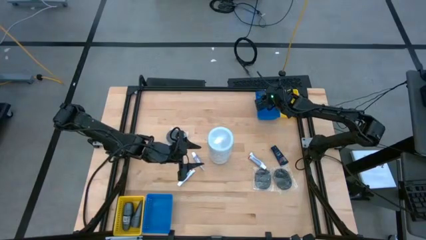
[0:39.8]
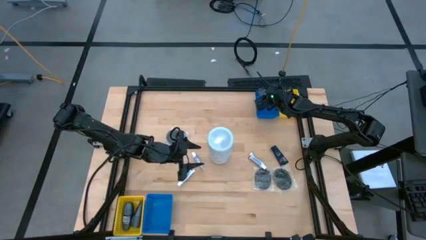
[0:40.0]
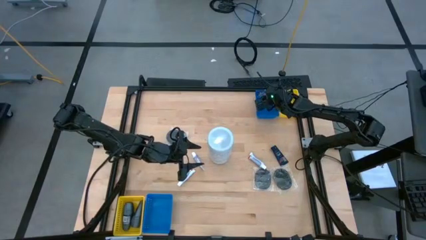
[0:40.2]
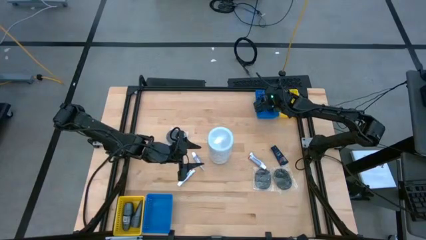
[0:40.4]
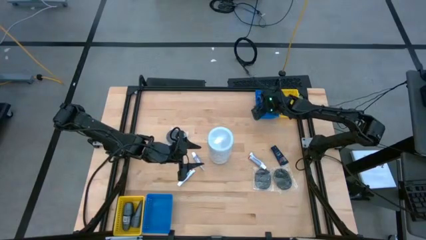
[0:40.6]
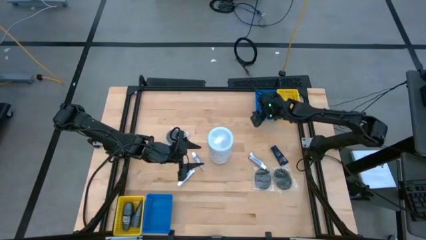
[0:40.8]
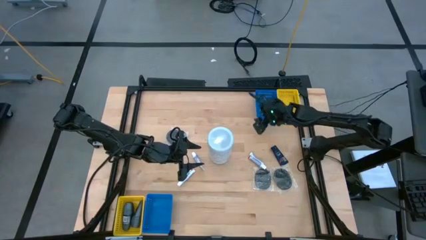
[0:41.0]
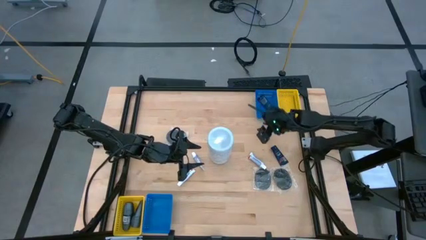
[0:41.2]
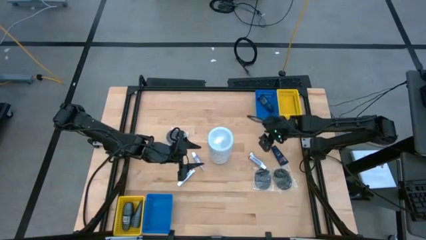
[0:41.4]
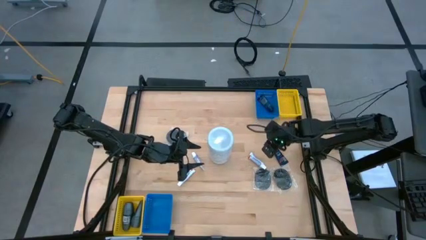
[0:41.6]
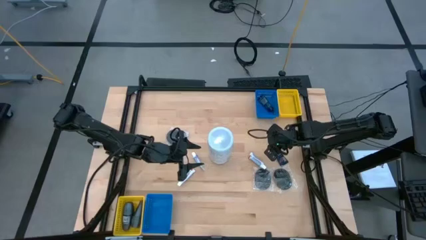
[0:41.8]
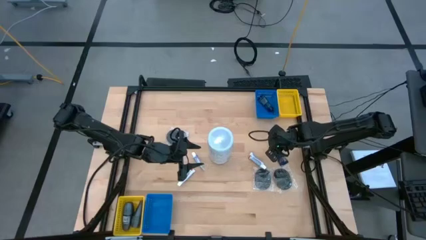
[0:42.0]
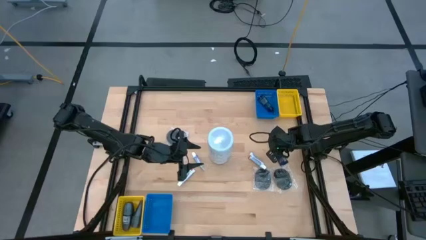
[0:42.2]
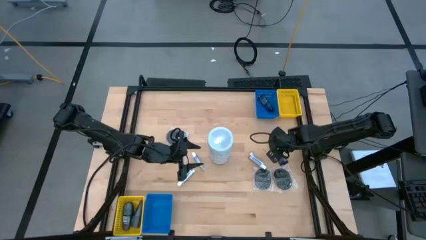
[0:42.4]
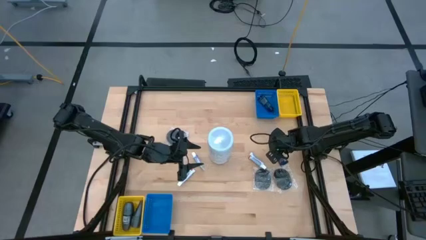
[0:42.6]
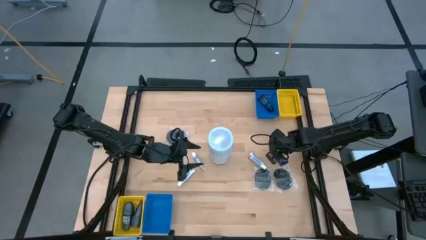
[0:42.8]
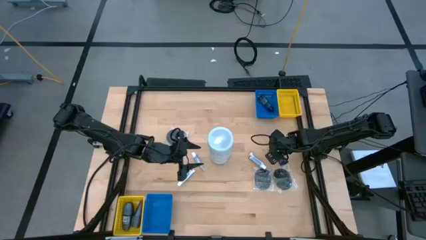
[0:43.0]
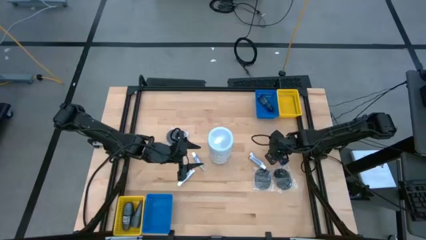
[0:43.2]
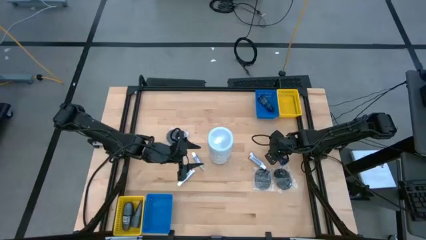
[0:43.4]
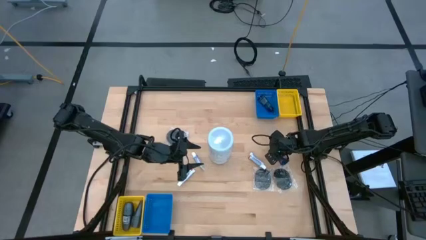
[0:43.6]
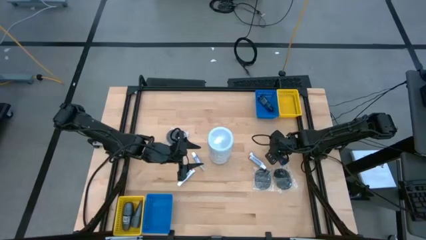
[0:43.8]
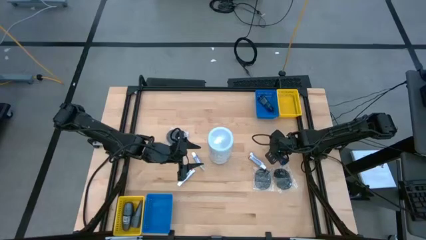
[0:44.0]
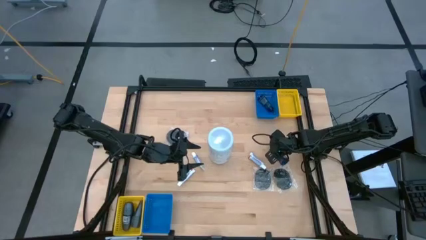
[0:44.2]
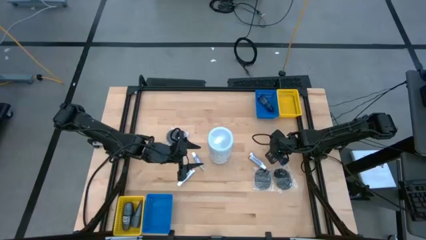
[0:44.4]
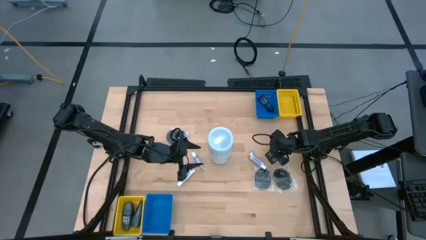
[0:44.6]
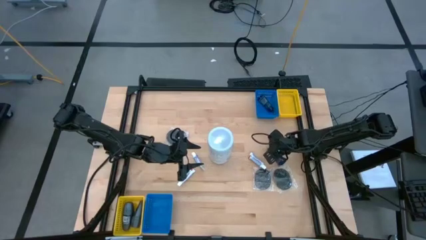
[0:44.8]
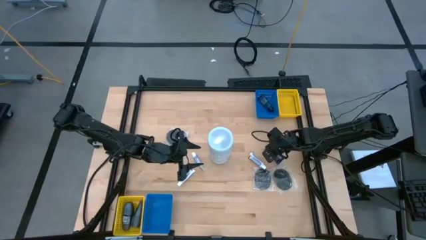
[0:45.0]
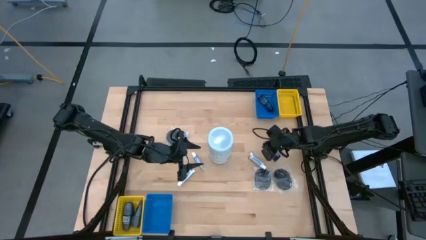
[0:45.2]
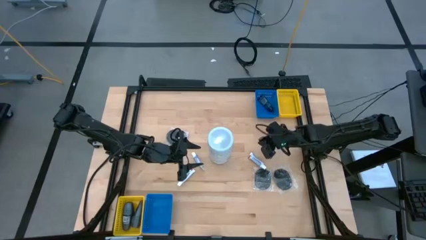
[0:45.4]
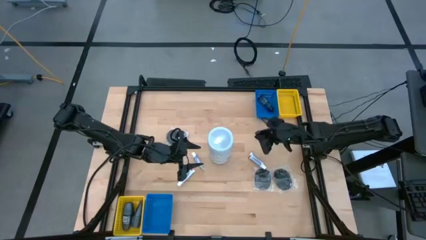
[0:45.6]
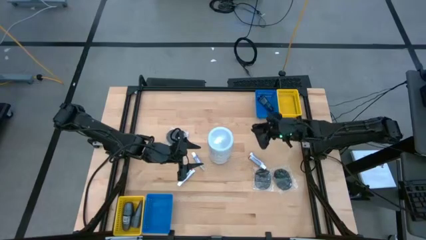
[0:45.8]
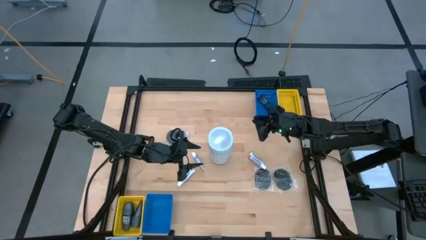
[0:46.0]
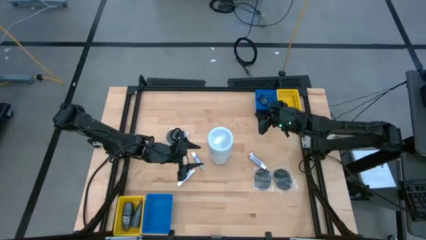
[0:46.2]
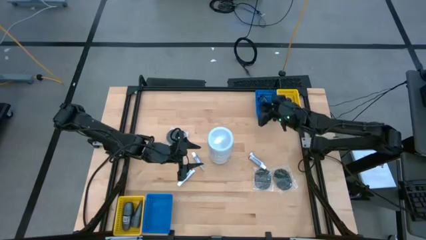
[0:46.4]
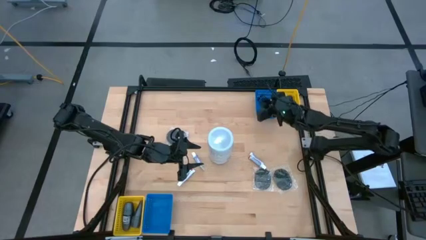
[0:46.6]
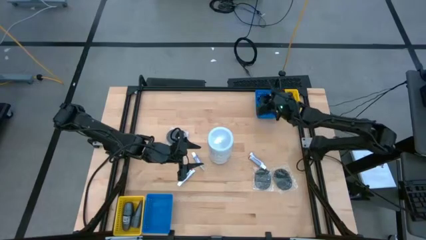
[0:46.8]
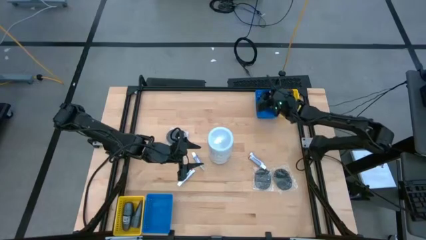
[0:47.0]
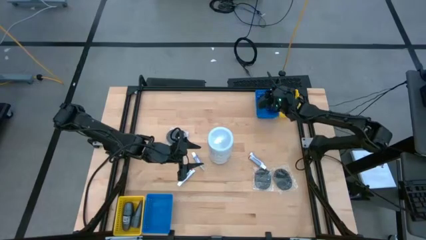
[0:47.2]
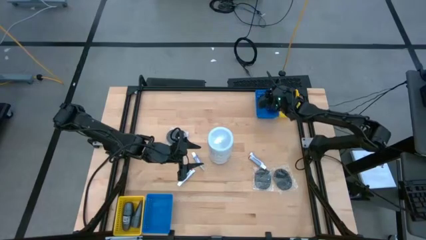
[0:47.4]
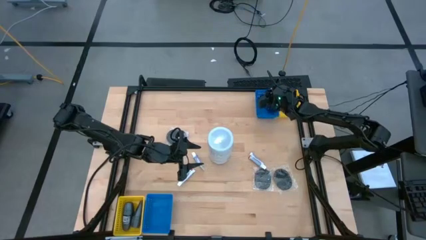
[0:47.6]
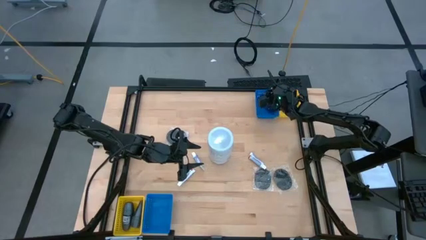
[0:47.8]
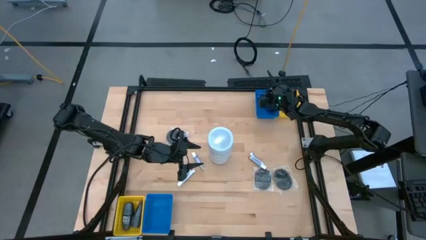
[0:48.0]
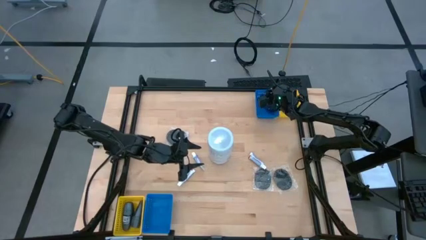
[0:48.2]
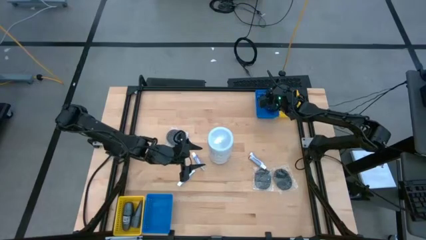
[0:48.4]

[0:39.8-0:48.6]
Task: Pick & Place Travel size toiletries
Put the blue shave cream into the top blue bin

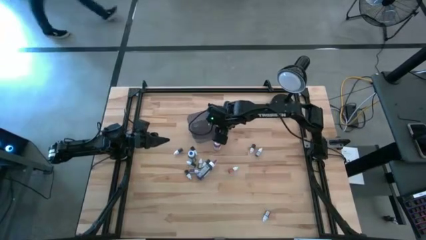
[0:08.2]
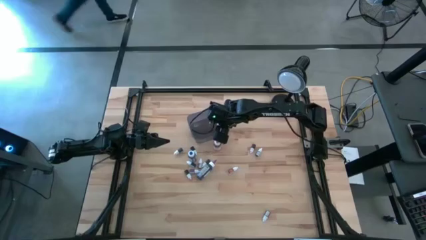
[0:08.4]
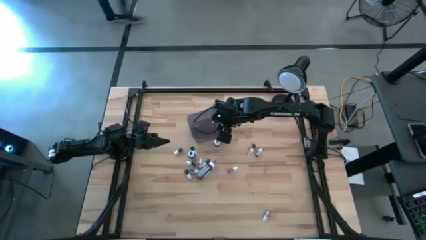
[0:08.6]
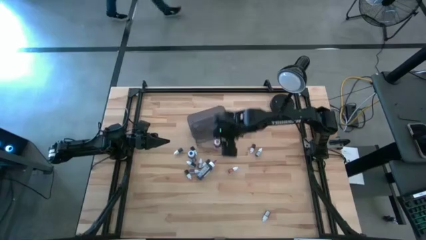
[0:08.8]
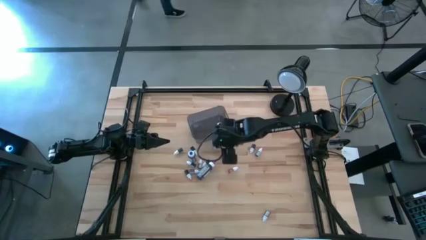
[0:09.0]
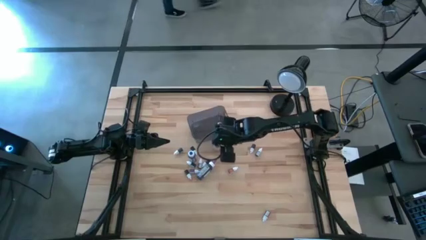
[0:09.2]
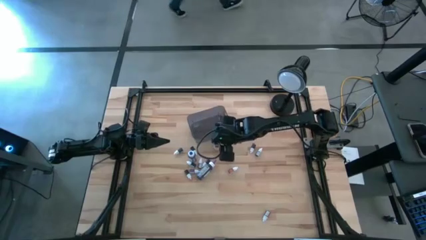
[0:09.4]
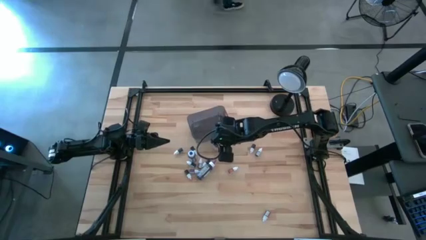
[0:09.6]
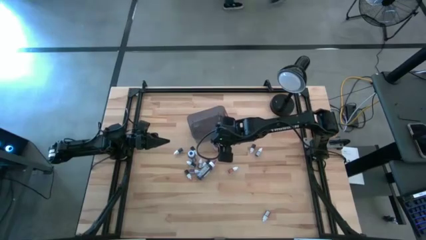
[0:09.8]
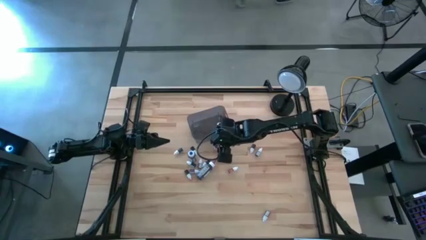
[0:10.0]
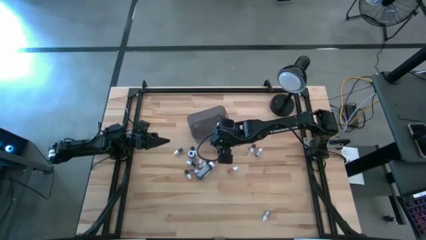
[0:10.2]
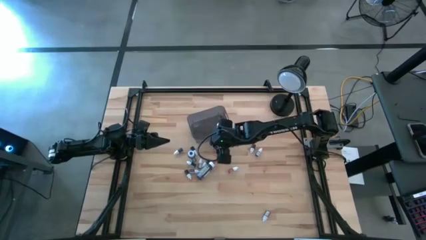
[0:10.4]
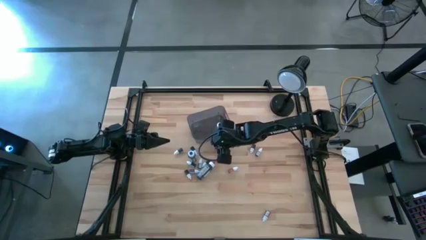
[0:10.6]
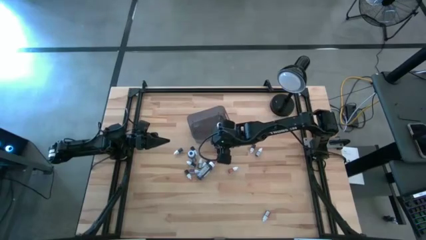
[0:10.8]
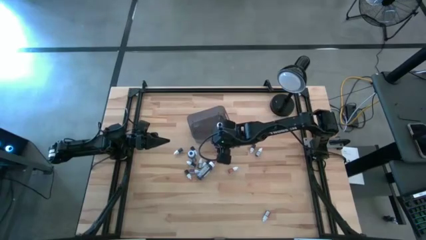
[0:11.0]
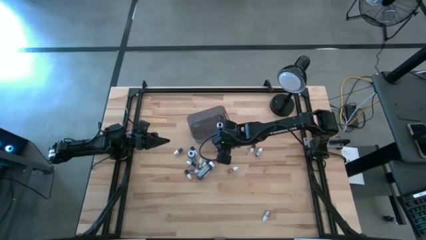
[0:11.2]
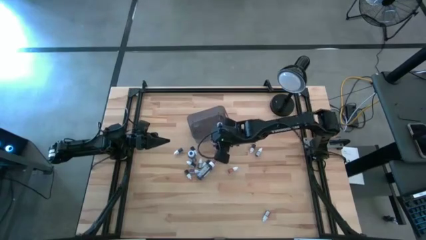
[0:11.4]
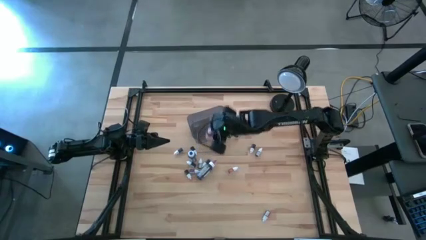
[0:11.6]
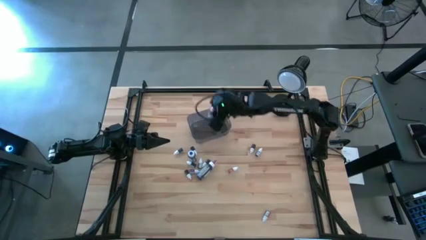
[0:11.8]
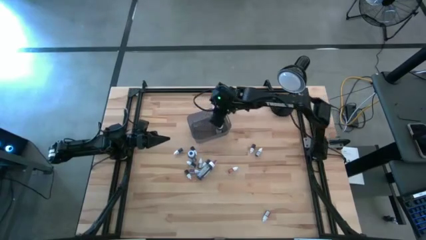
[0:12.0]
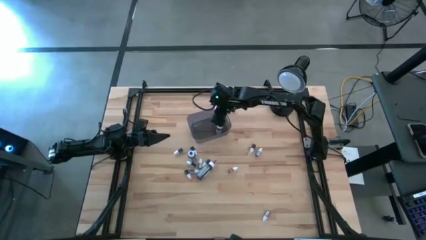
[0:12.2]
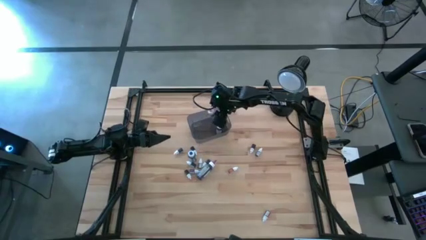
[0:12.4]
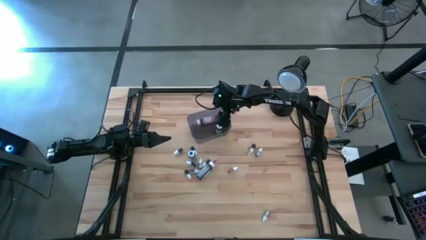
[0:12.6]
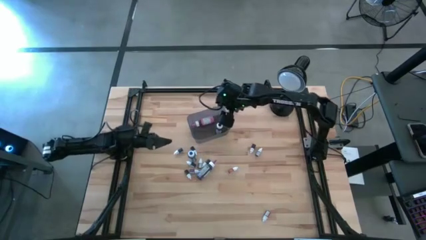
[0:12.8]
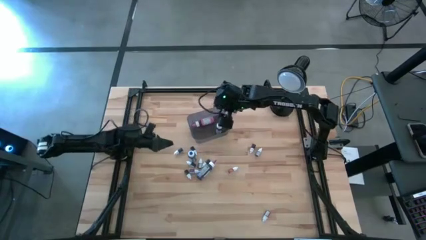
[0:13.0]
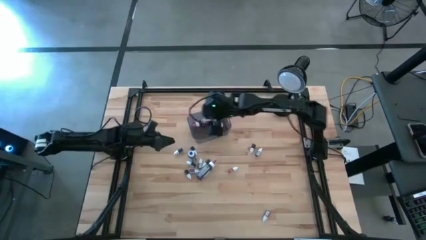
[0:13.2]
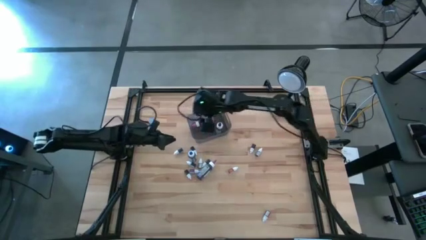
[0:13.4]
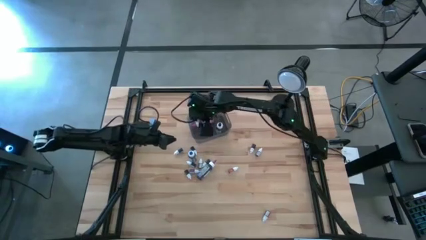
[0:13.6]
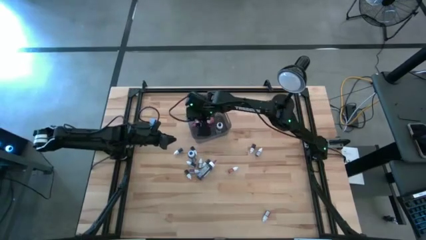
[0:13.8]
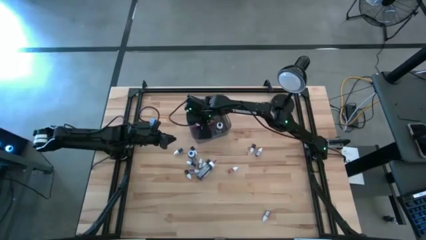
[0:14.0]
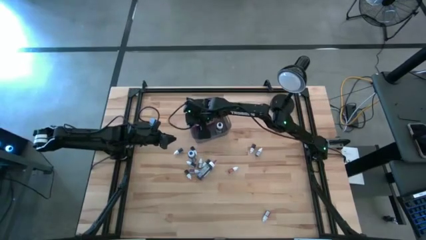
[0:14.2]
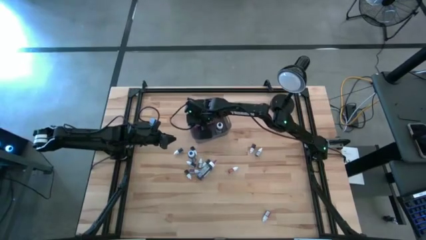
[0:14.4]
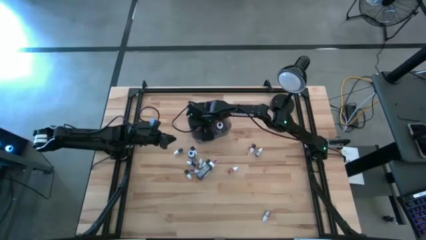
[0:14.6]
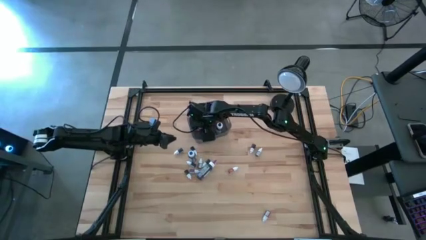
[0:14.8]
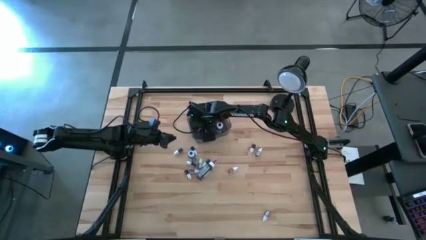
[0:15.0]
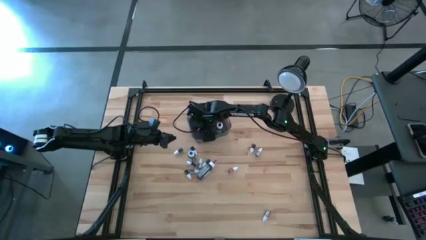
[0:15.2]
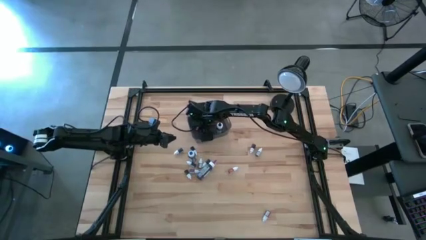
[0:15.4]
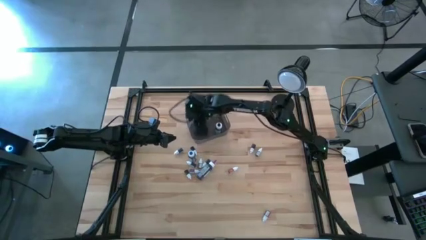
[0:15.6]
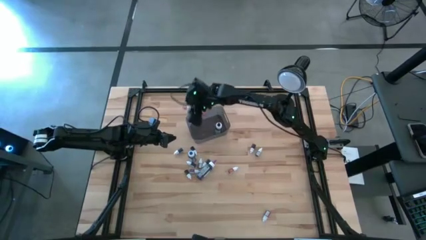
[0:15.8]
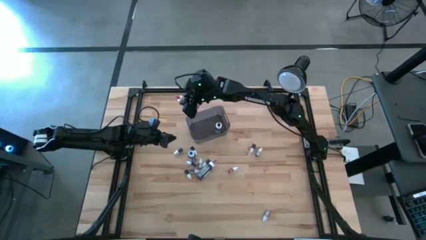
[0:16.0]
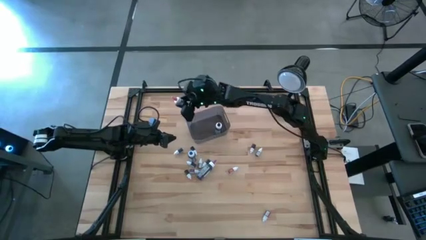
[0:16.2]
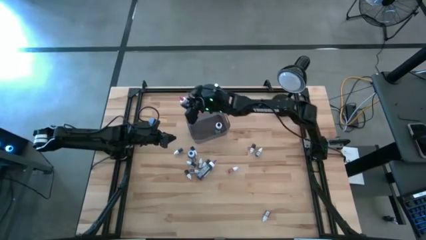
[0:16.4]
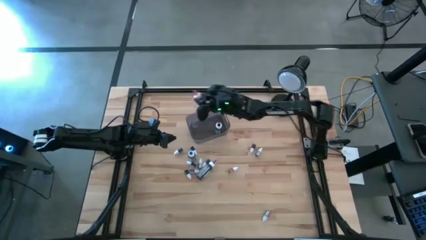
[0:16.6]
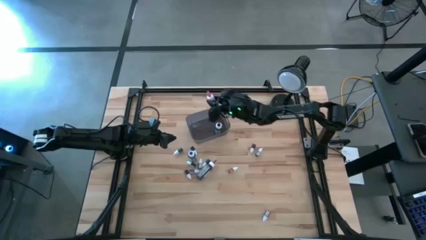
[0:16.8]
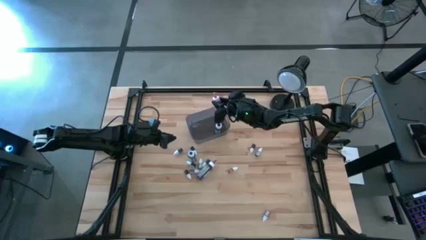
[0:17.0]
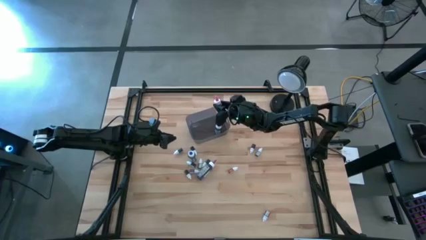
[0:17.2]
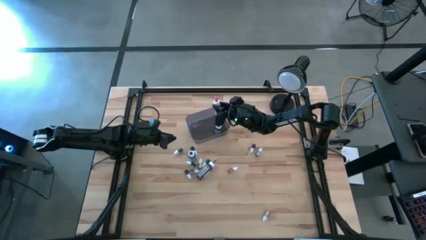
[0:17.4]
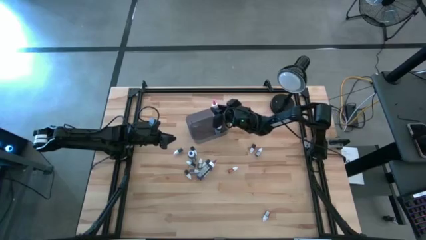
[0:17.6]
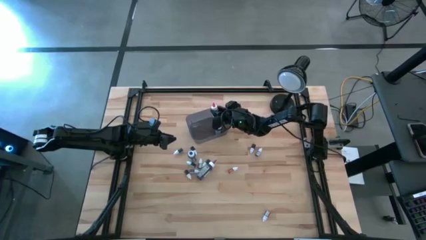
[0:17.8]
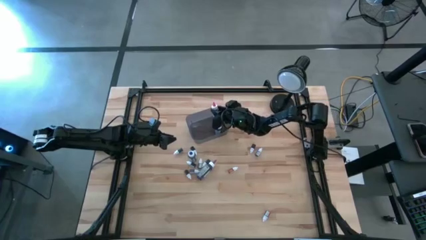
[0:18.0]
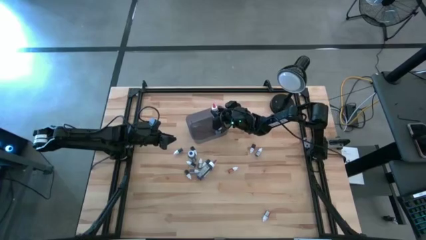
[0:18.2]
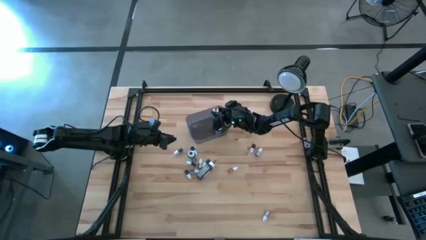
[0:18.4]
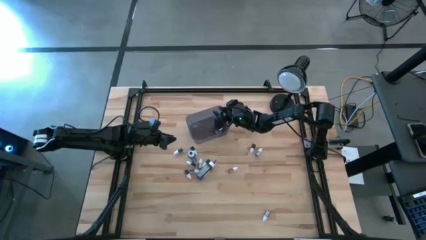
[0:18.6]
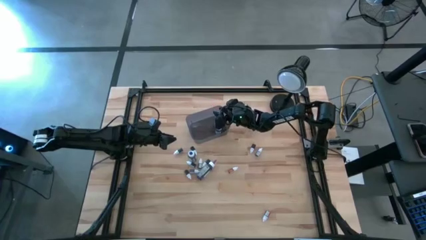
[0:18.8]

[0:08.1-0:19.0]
Task: Pick & Place food coloring
Put the large pink food coloring bottle into the gray bin
